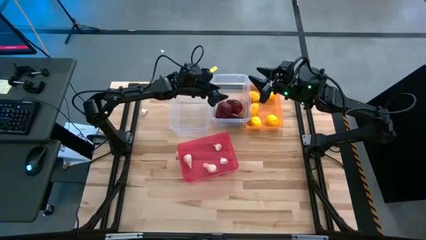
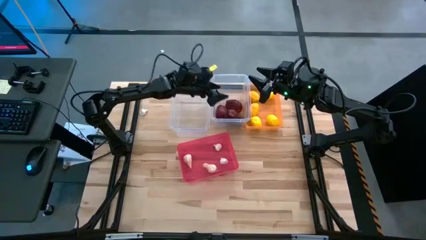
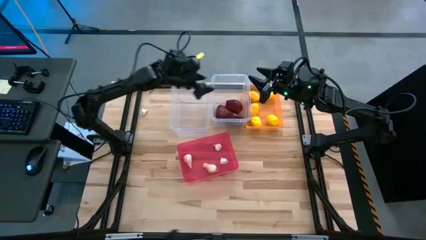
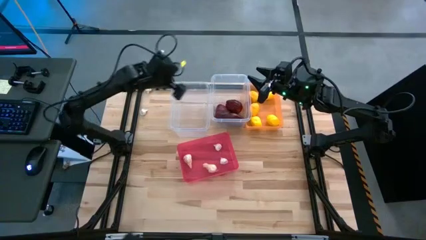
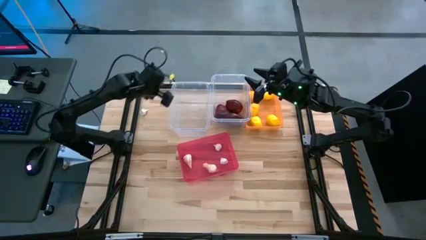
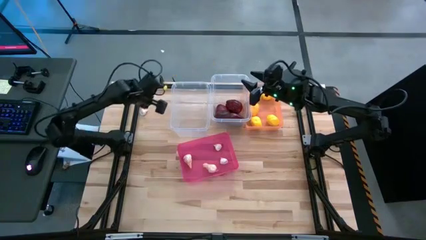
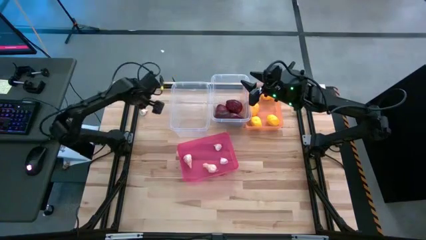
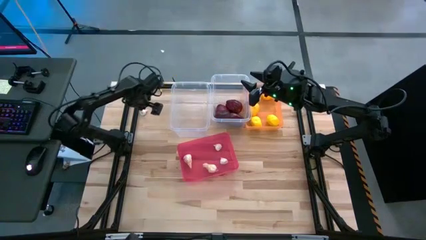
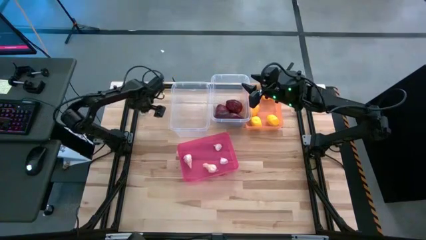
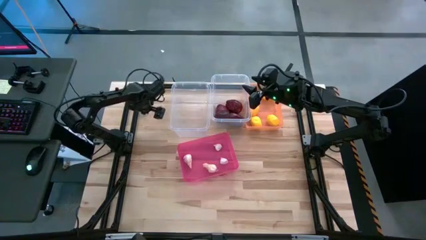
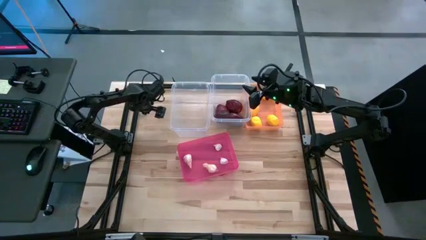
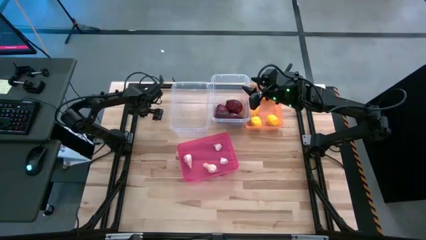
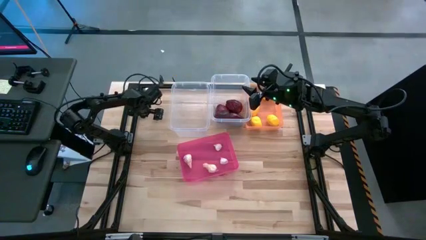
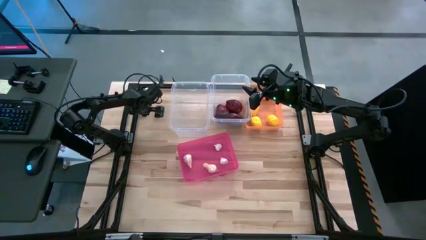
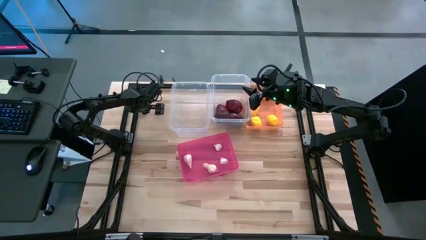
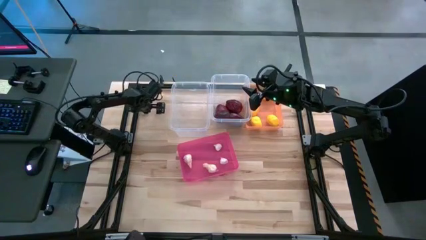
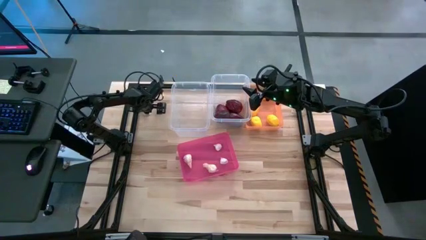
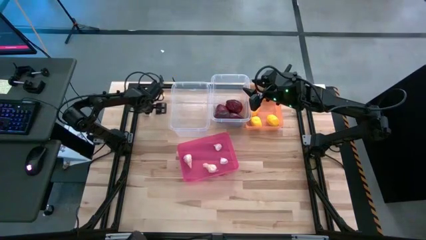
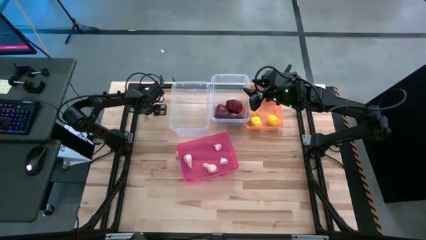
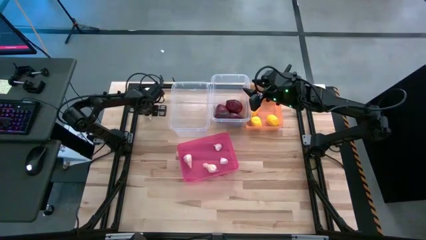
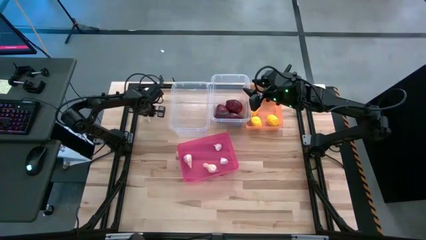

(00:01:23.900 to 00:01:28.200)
Task: Sort produce into baskets
Put the white garlic into the pink bin

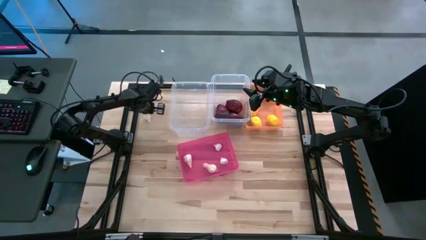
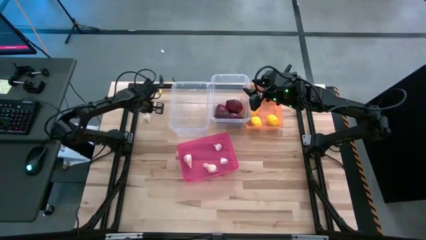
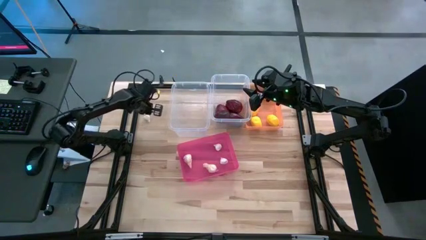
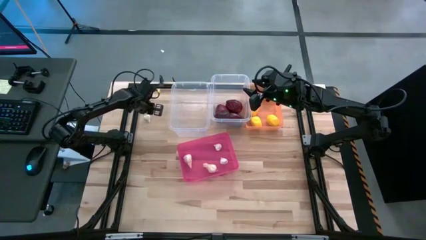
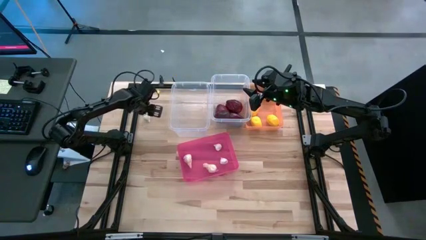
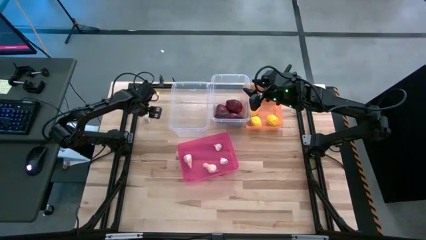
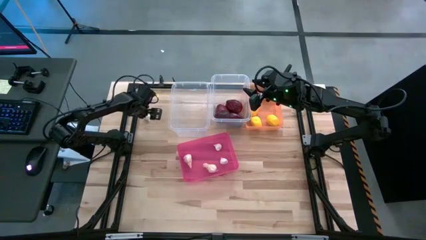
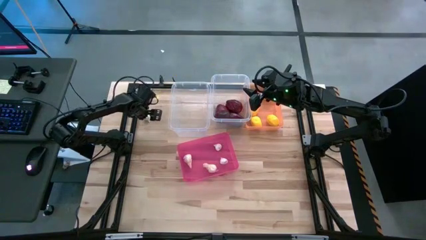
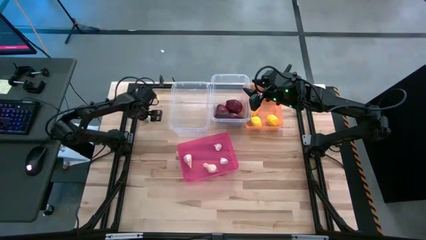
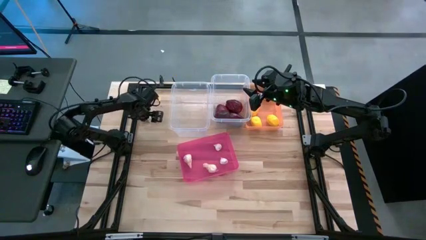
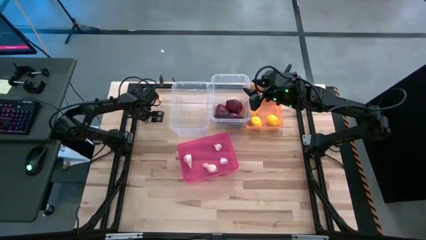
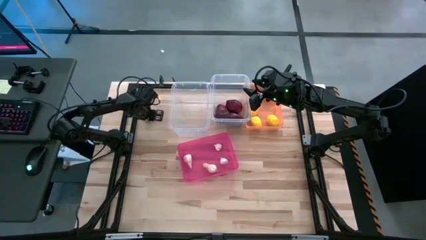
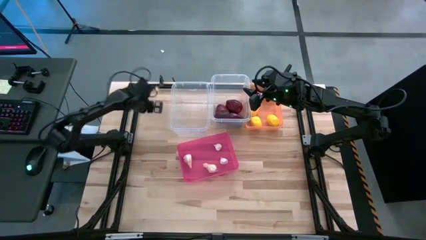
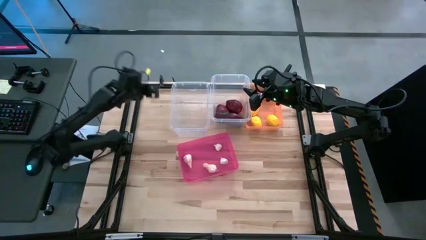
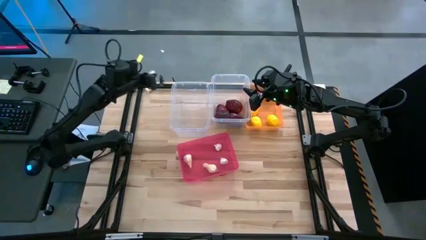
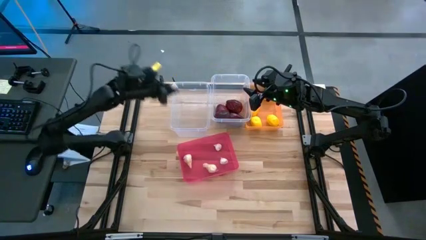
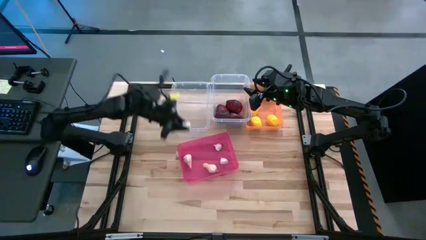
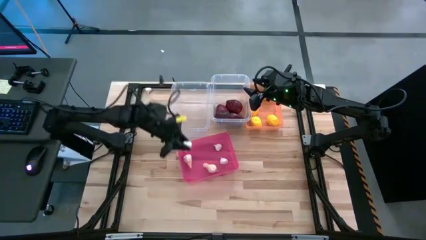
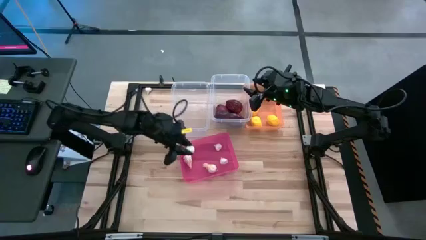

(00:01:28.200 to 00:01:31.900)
Put the white garlic into the pink bin

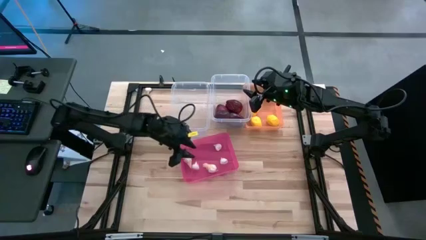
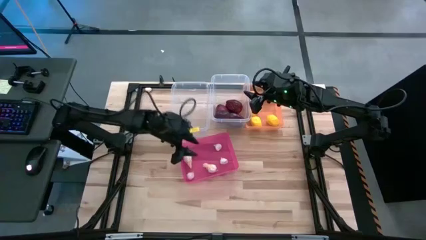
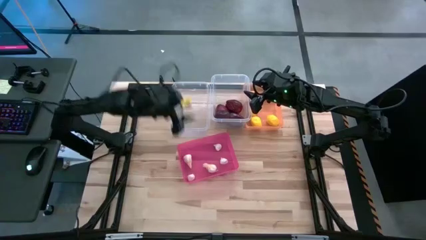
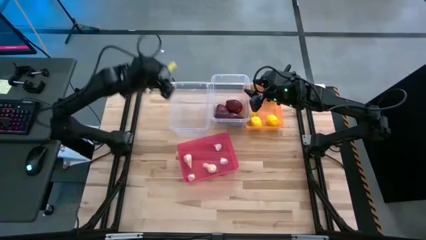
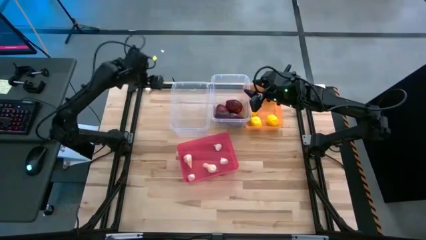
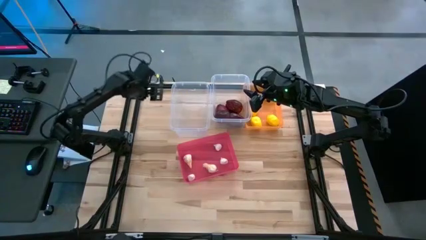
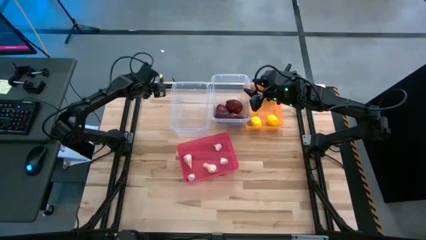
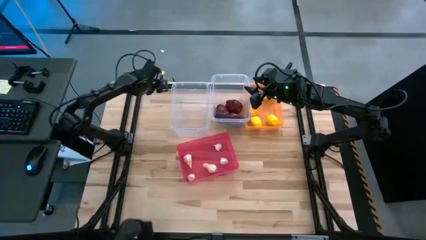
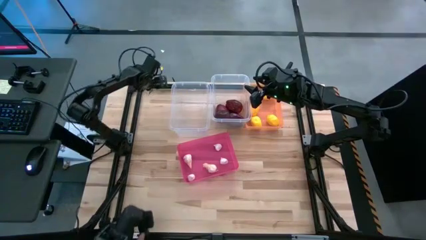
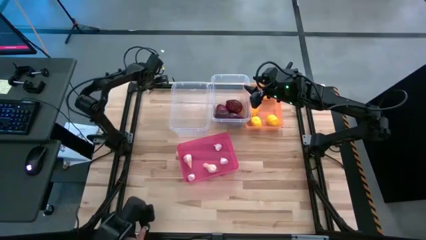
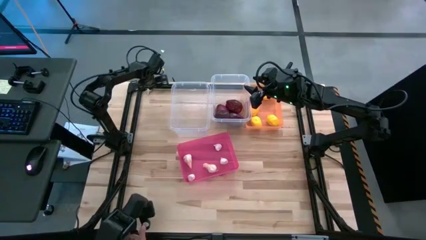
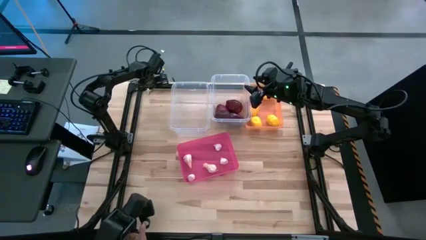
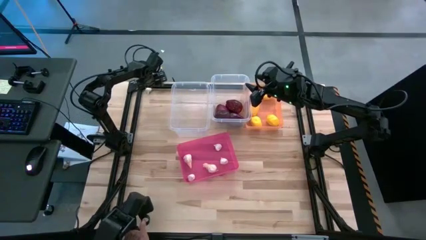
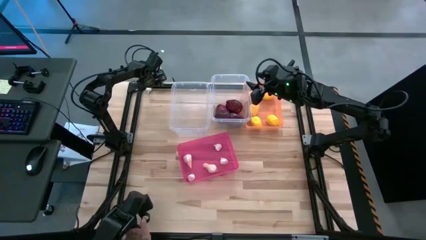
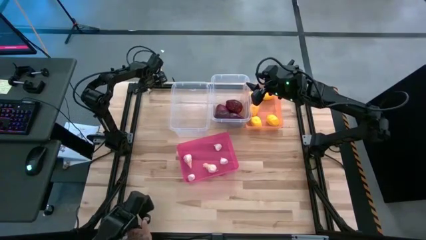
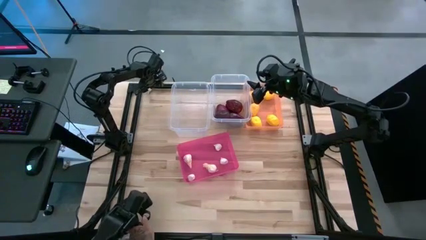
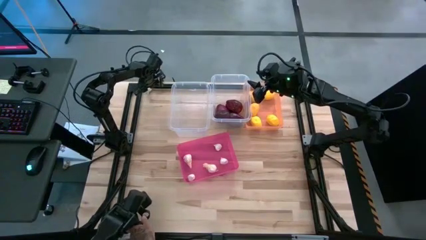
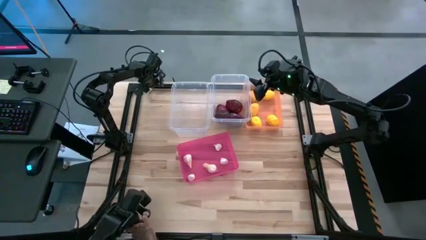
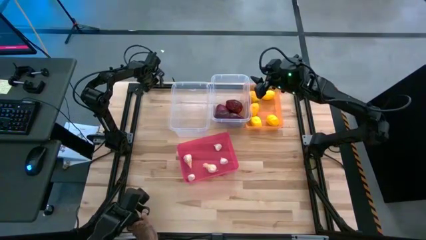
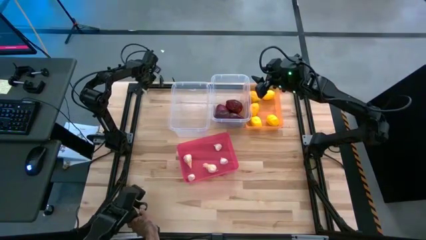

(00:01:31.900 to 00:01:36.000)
Put the white garlic into the pink bin
